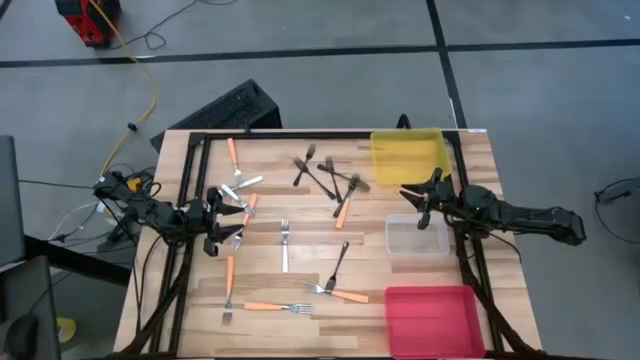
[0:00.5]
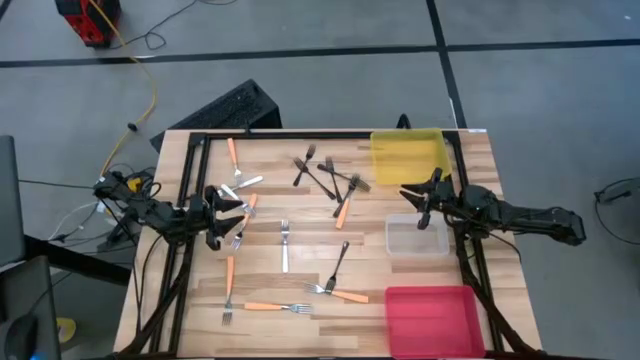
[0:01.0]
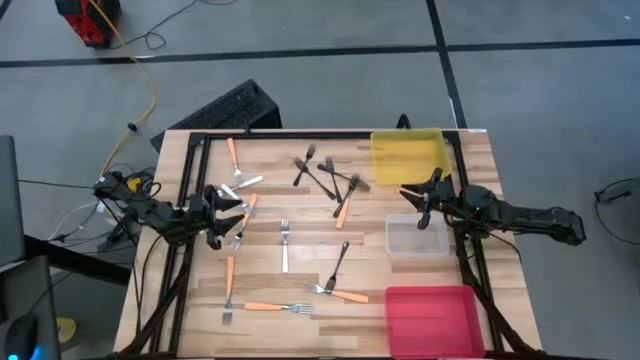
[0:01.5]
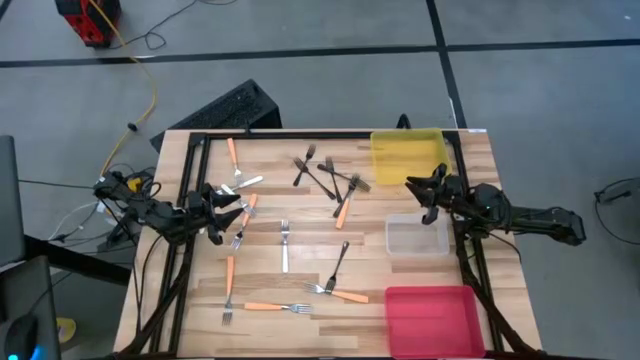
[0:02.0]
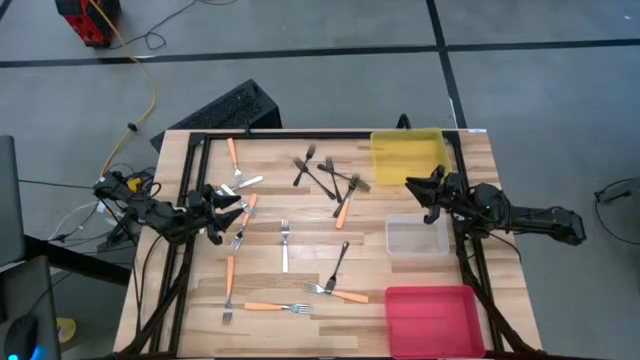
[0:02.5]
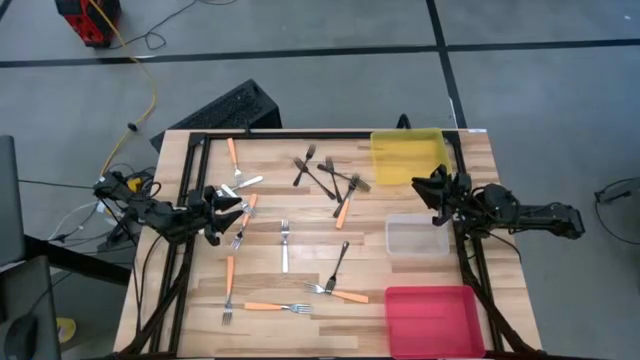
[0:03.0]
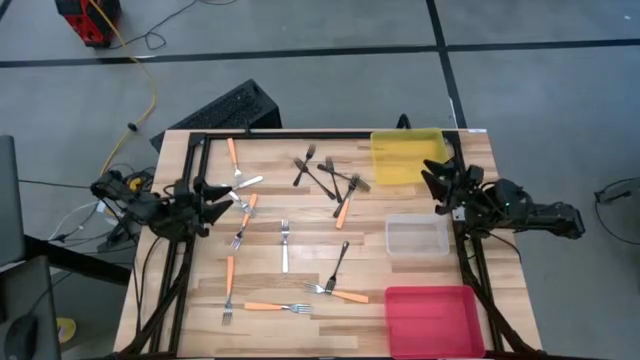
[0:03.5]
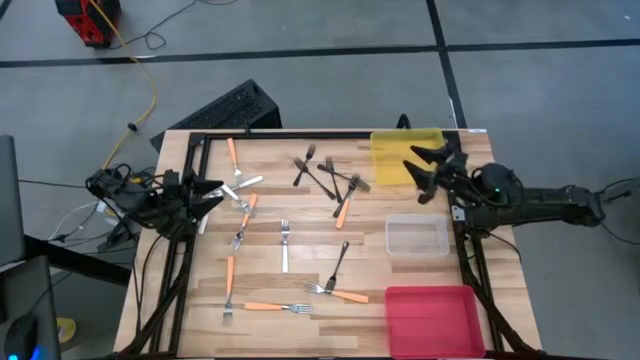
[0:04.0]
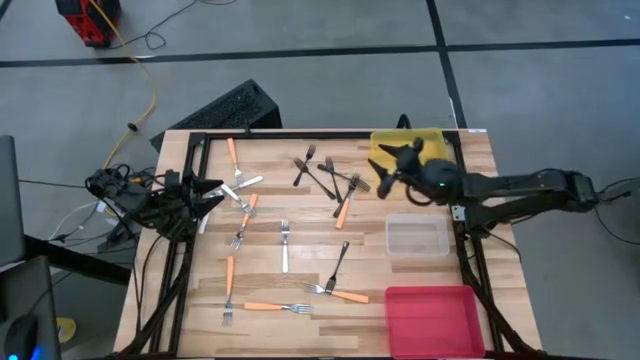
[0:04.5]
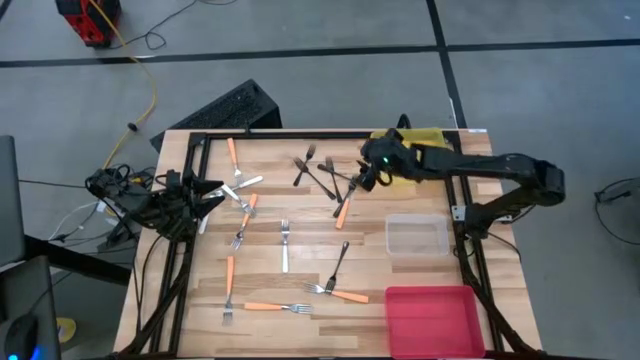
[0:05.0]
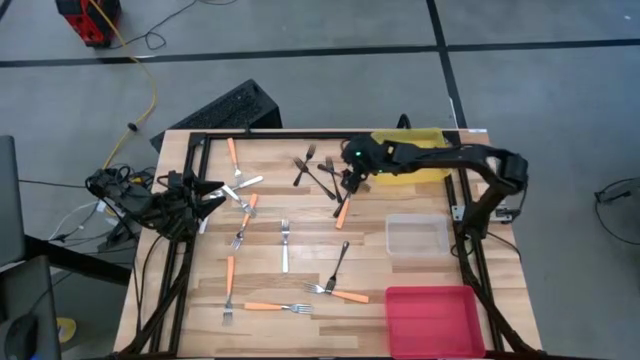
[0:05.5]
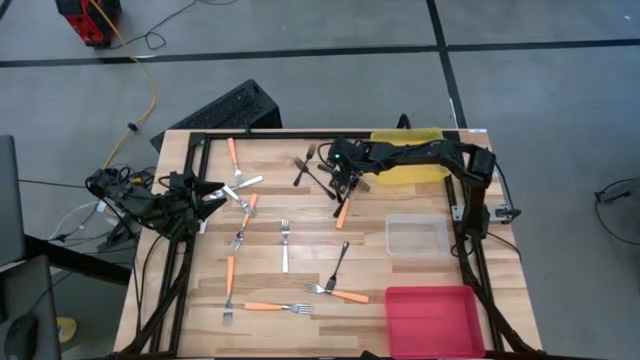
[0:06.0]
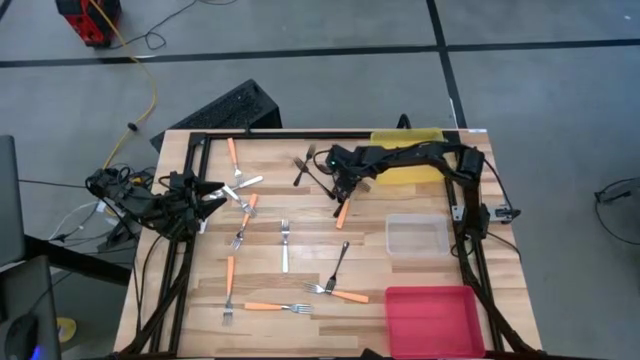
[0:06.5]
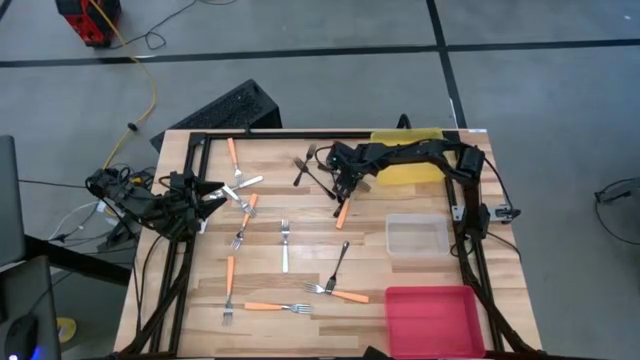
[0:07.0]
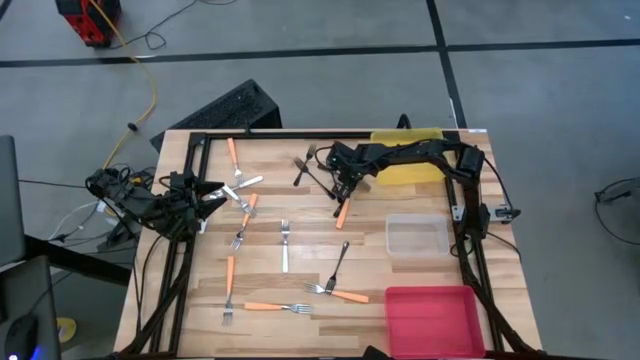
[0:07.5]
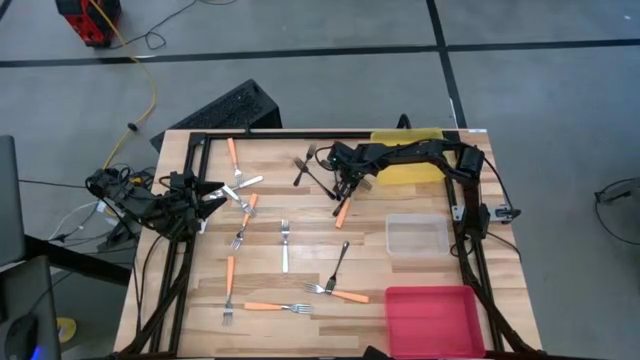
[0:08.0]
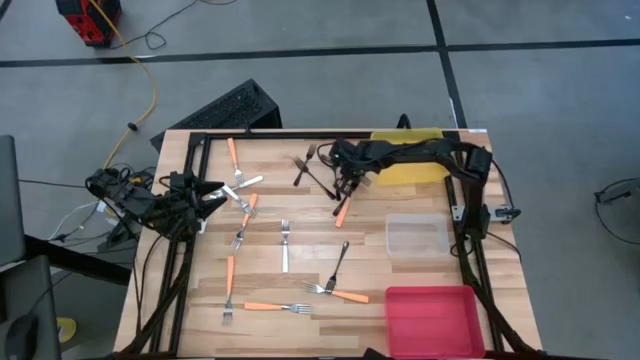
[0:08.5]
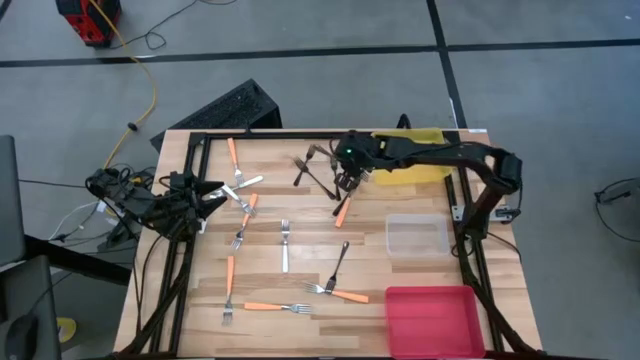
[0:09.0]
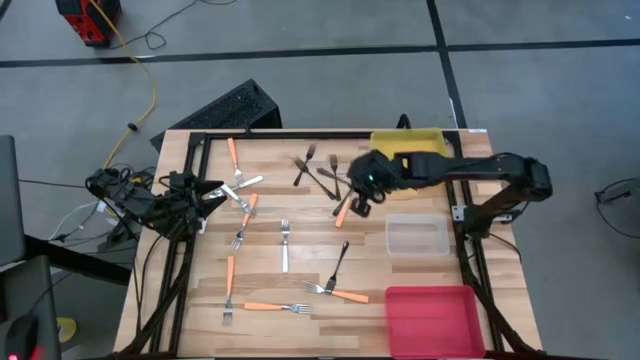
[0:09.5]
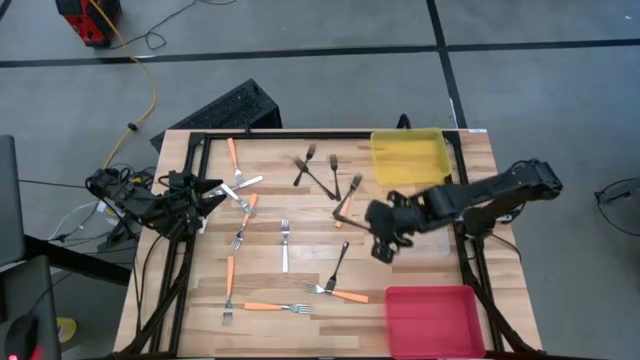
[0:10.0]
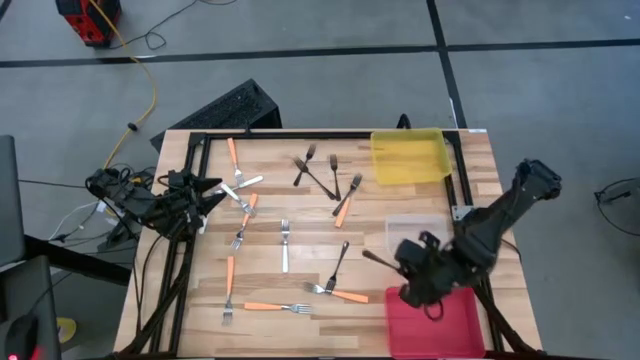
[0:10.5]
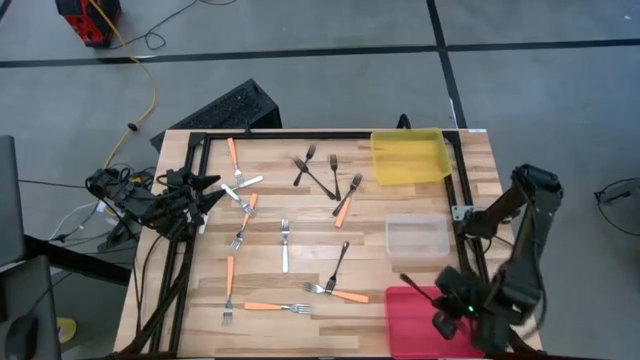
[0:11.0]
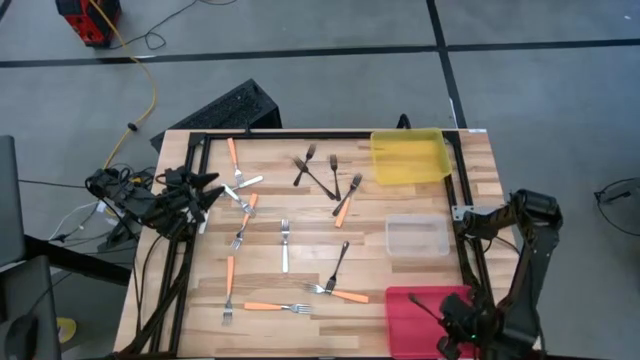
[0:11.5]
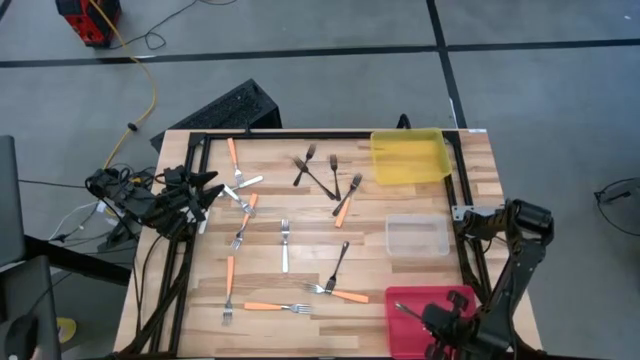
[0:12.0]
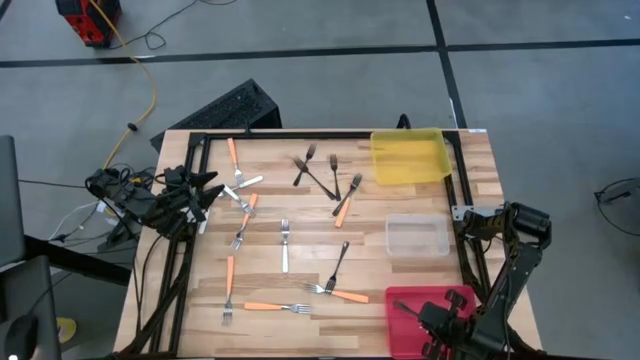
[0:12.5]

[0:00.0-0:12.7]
Task: Sort silverware by color (type)
Put the black fork into the red bin
